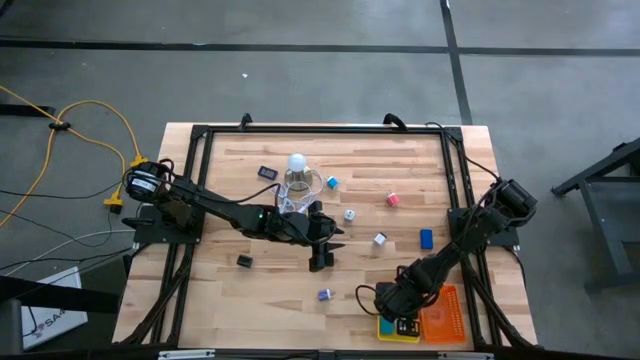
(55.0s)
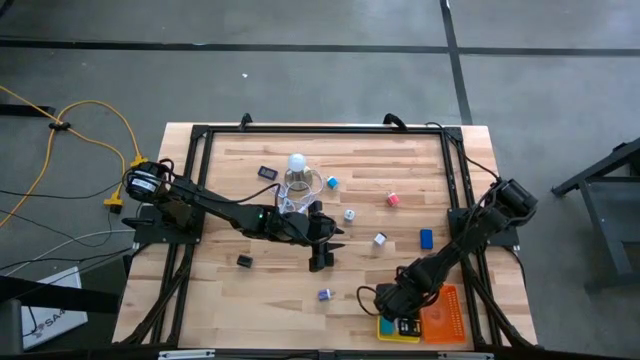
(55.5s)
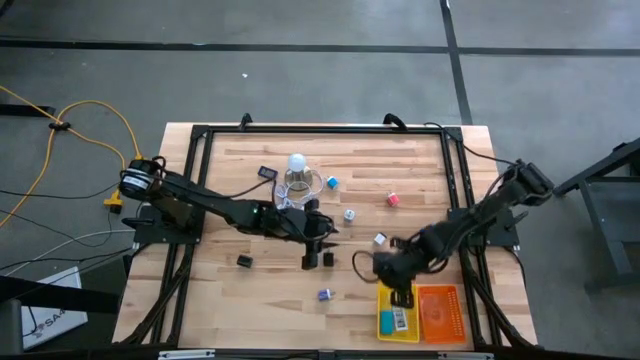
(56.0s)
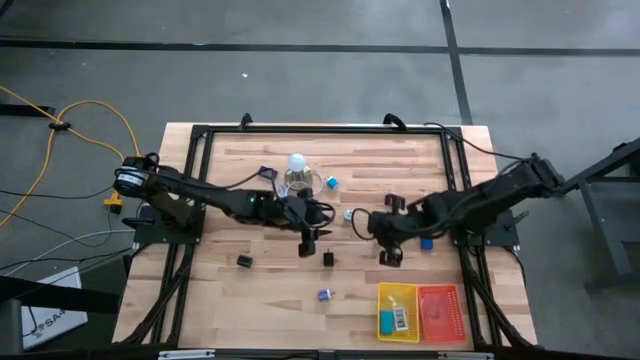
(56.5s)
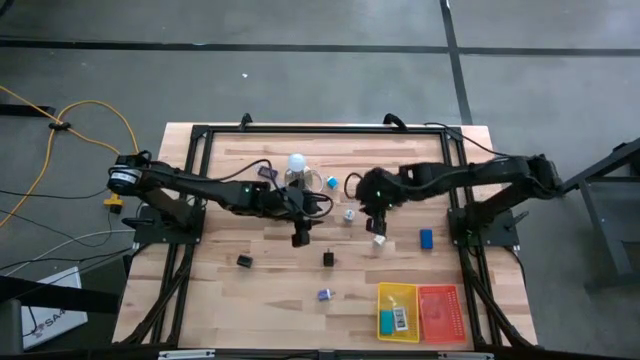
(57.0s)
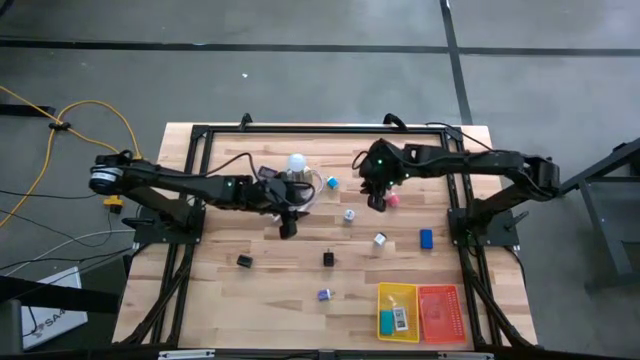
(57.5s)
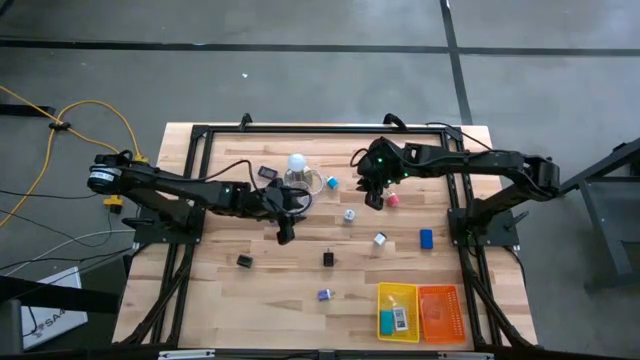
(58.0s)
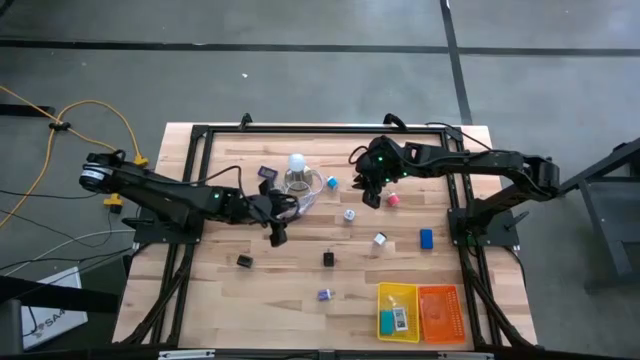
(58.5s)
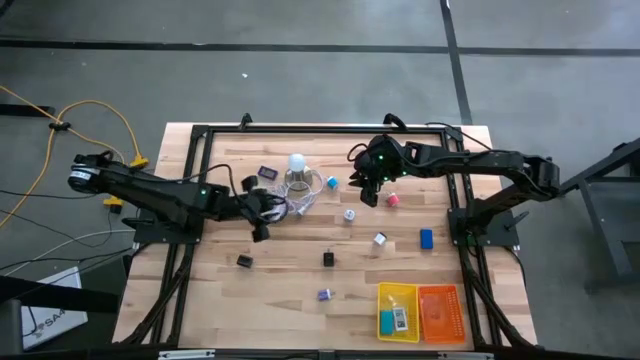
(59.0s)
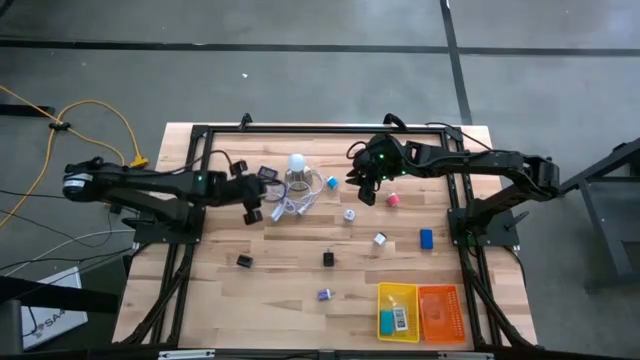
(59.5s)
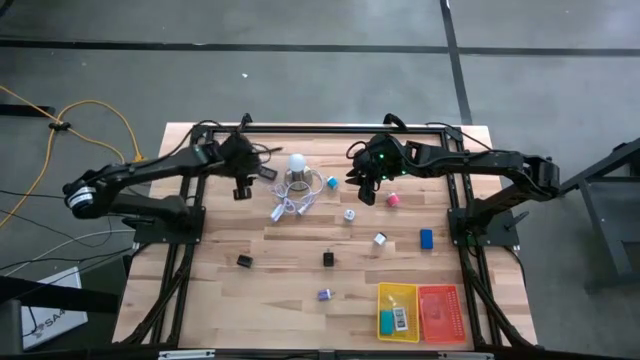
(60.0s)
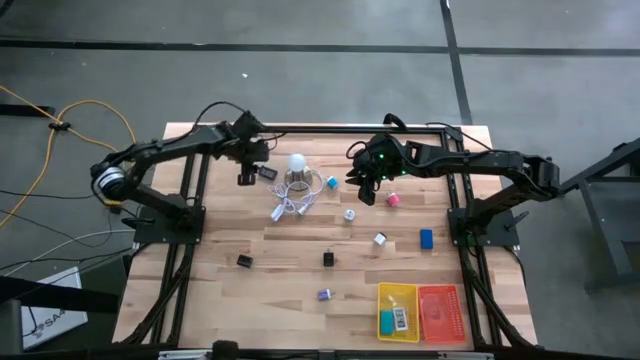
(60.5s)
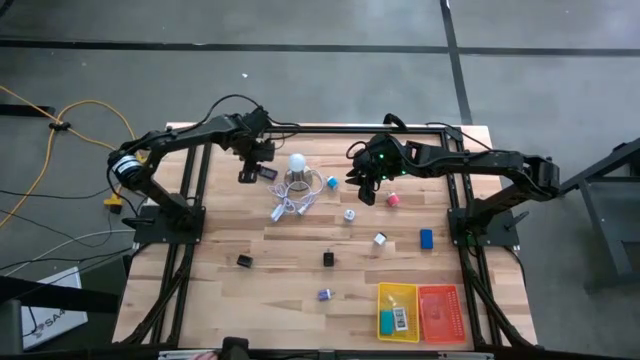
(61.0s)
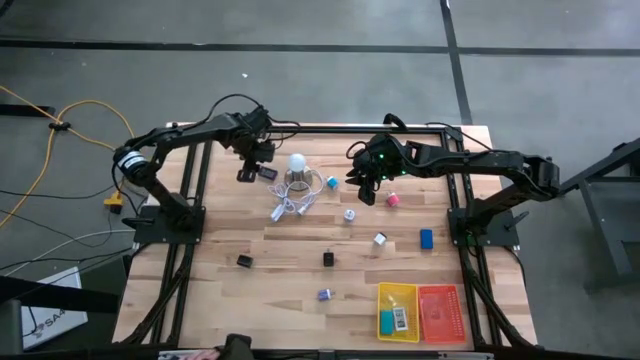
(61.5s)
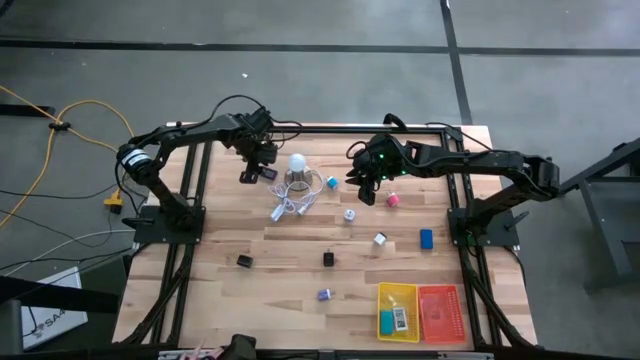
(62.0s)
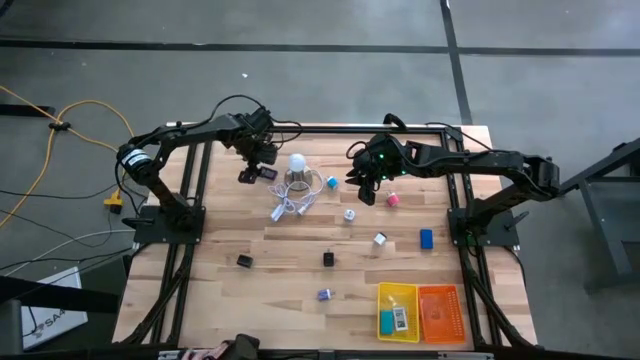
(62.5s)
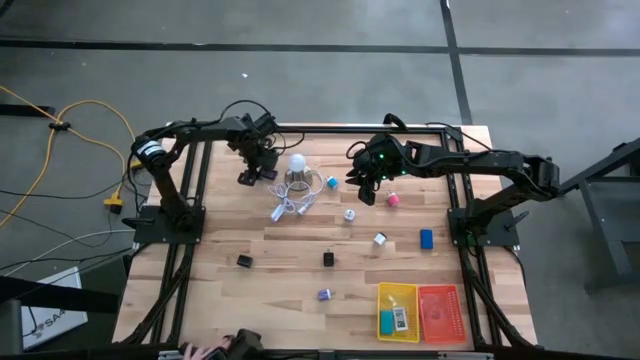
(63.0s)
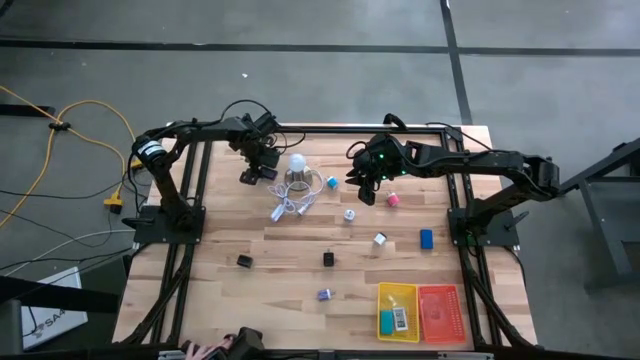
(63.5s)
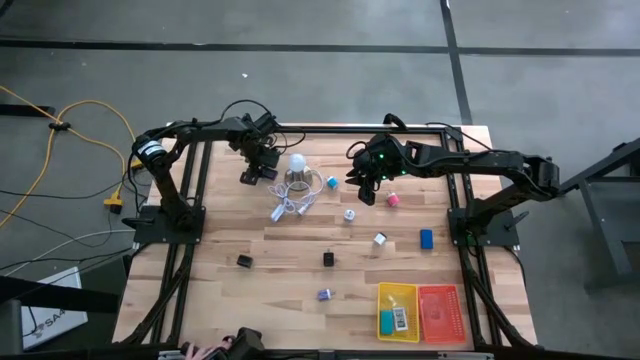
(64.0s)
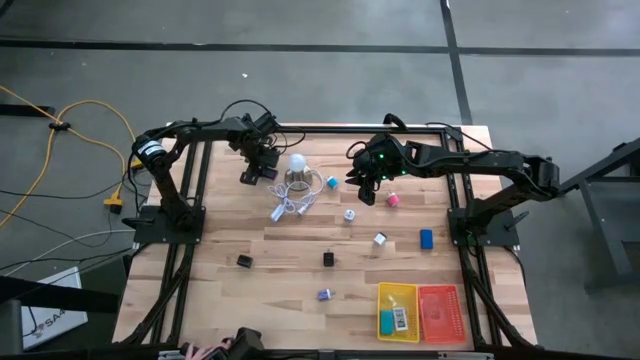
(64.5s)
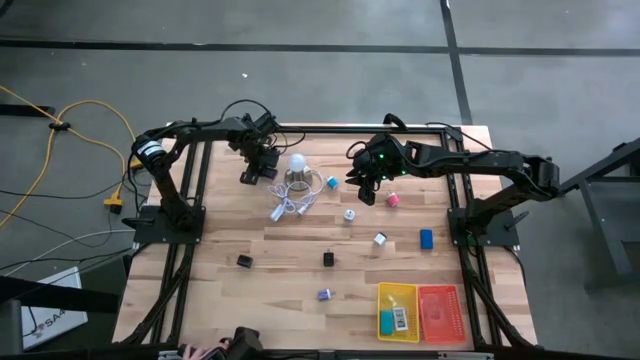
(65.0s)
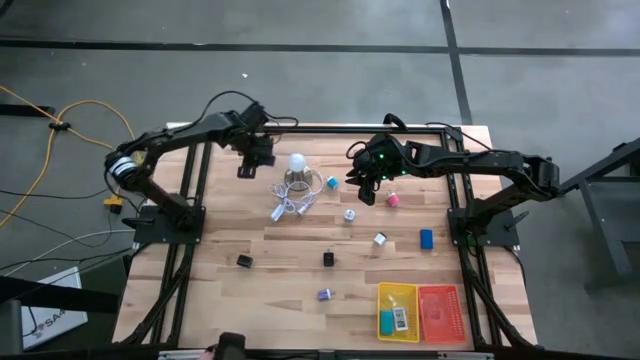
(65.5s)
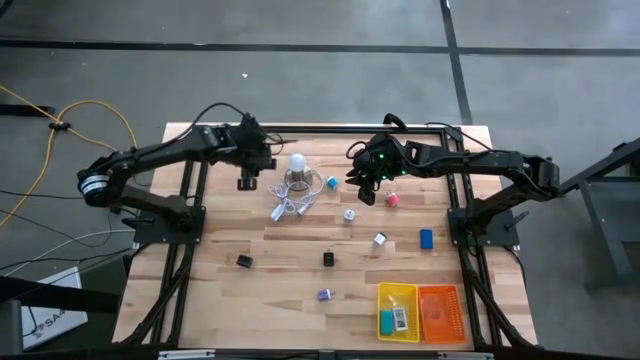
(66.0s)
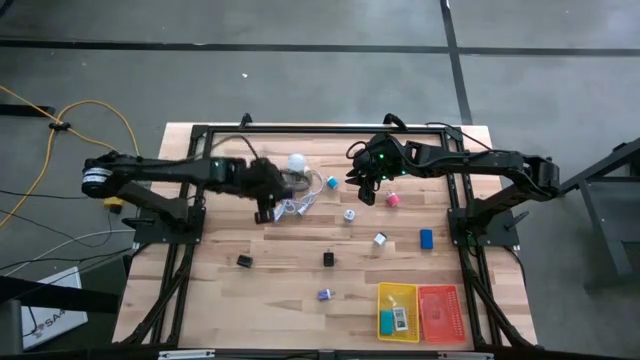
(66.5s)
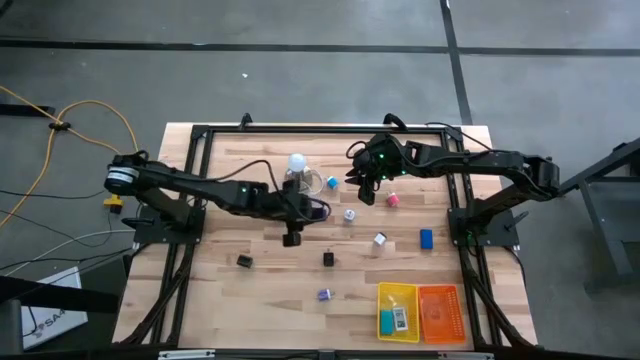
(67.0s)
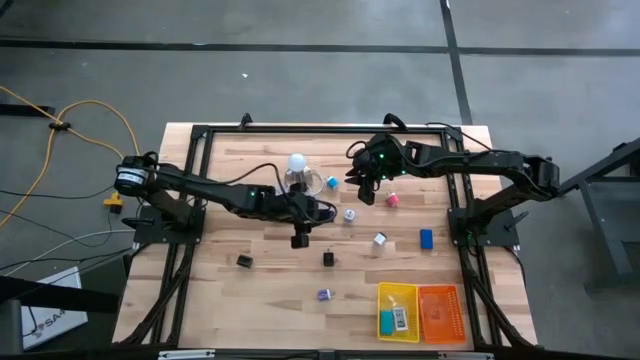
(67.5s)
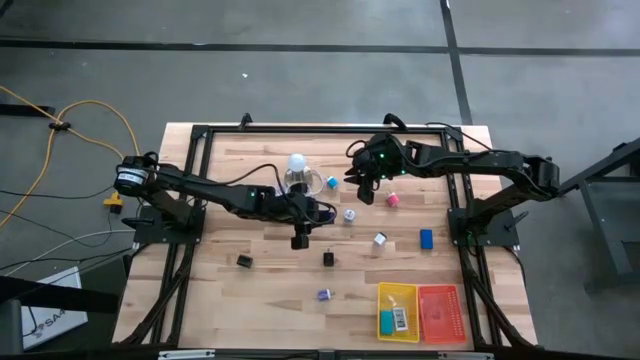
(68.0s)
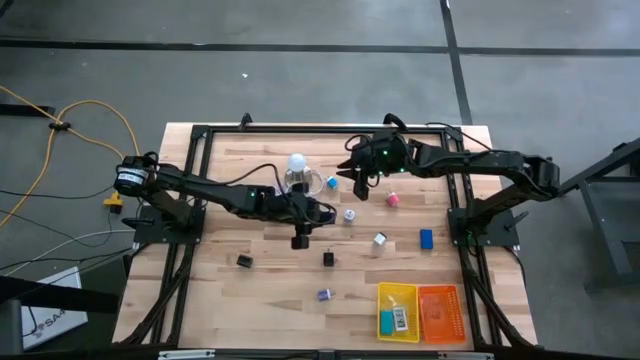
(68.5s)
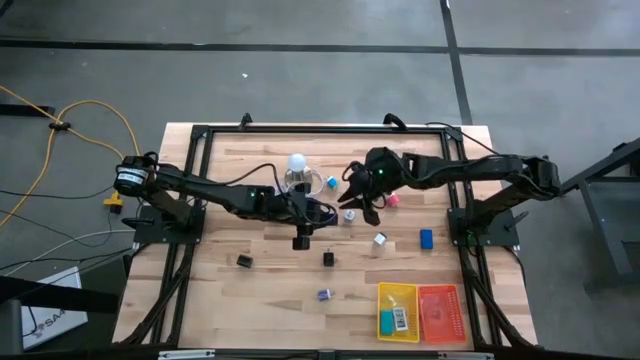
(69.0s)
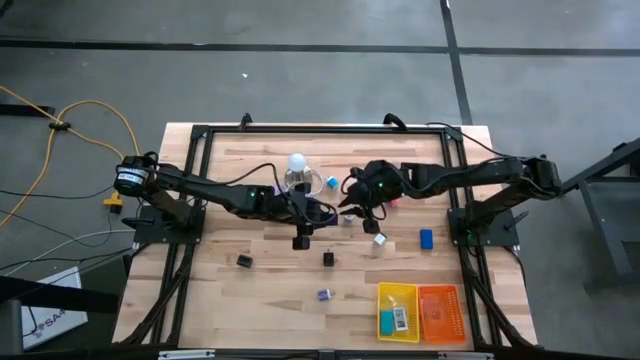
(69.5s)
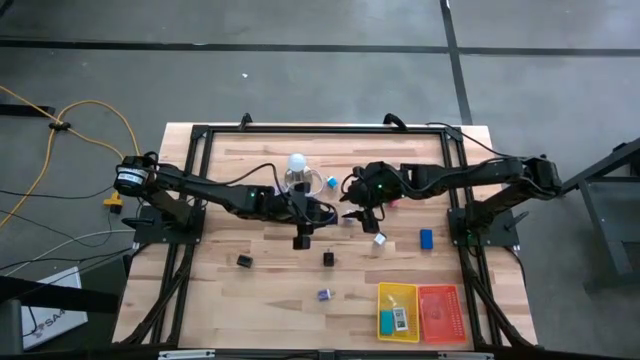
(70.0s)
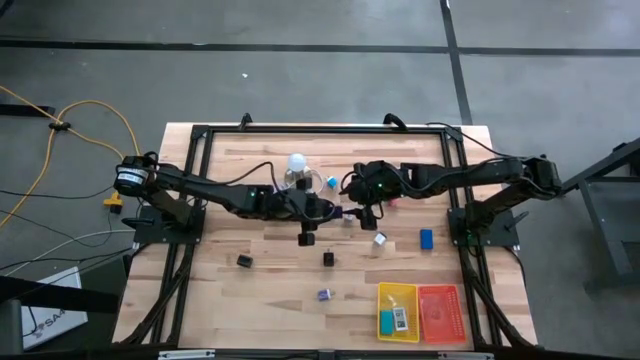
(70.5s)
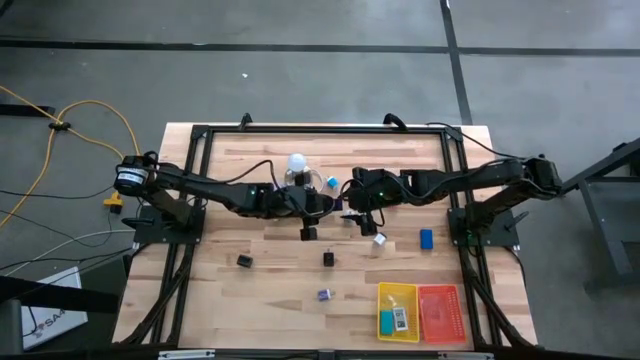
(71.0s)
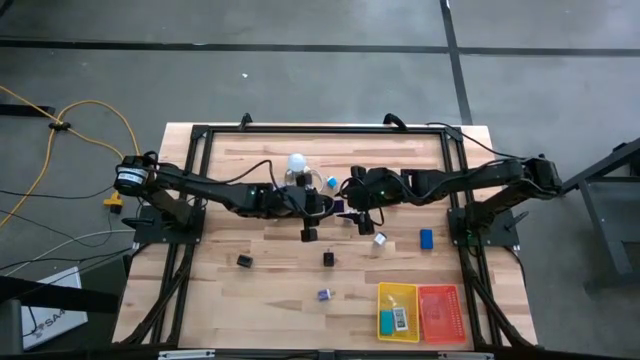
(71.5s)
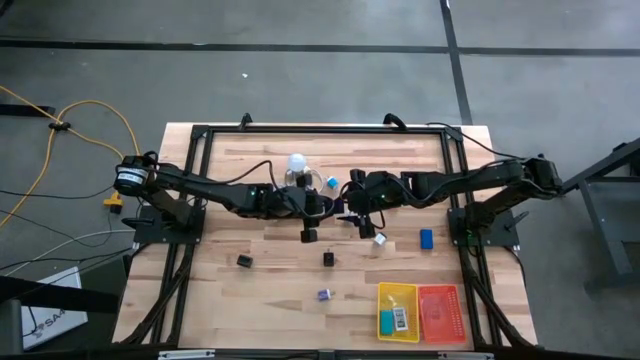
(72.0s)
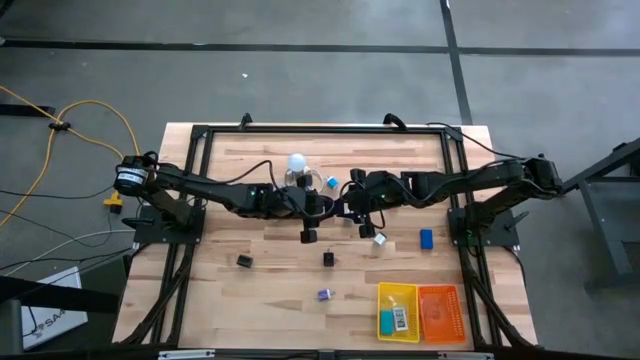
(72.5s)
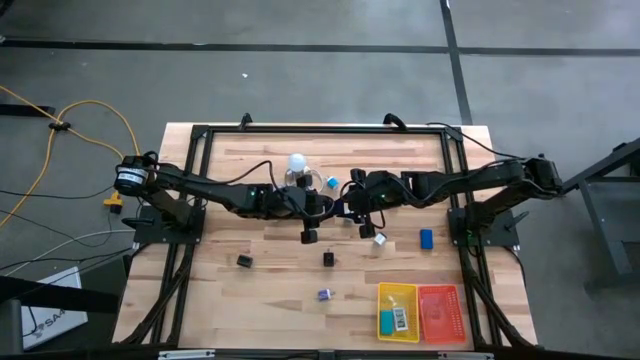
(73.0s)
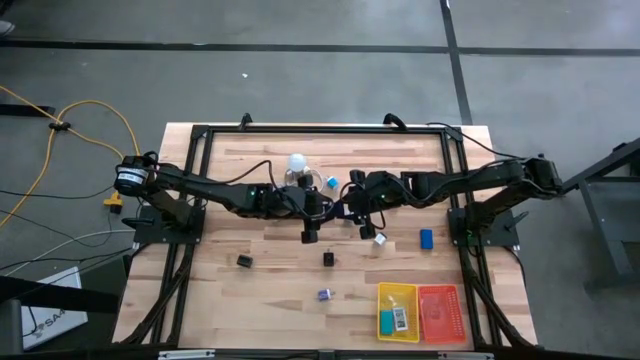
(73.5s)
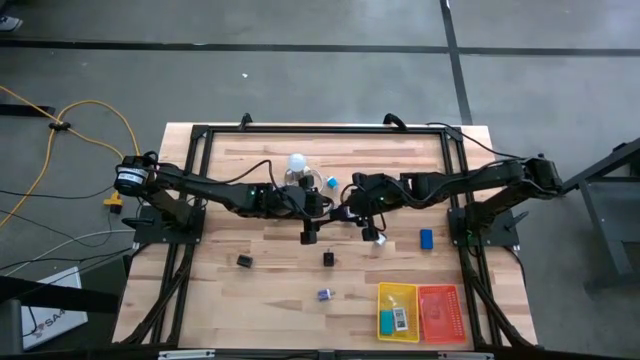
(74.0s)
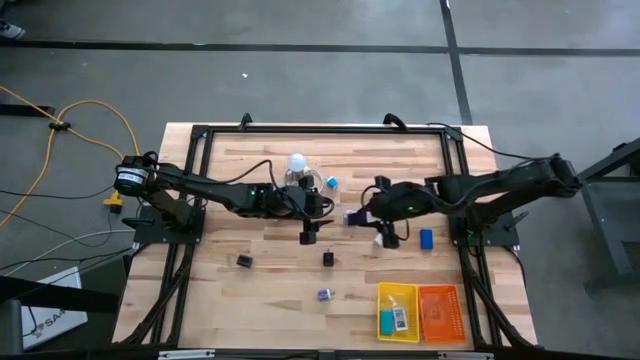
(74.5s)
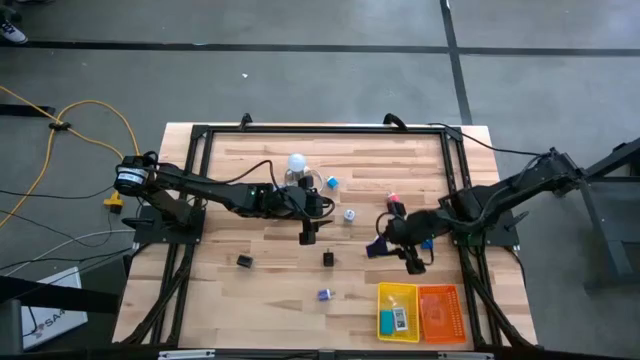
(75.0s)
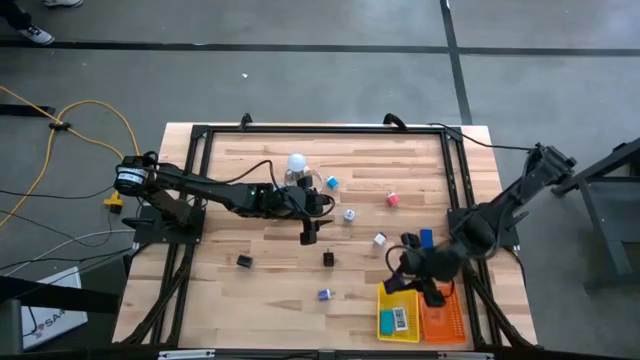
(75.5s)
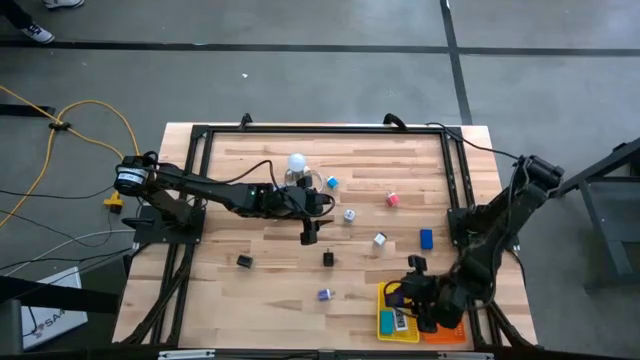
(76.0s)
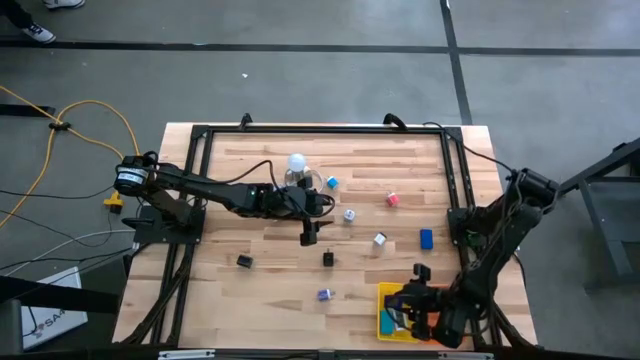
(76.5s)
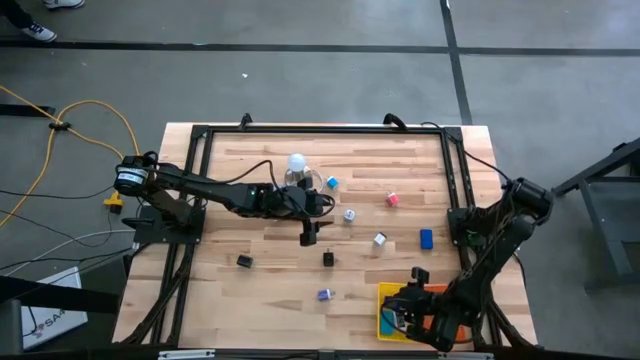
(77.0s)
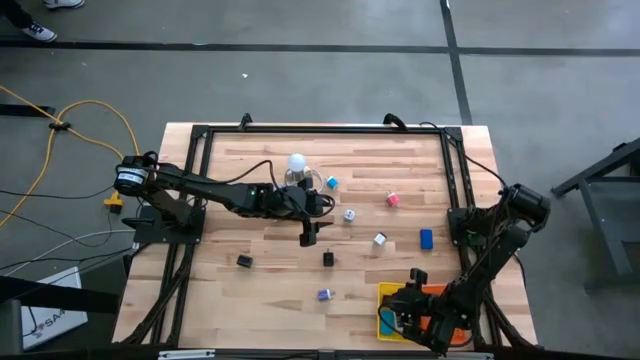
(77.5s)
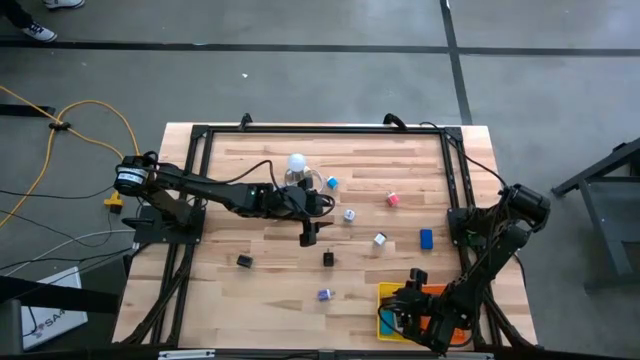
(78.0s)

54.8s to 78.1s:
Task: Pick & Place Office items
Put the violet digital clock into the yellow basket
